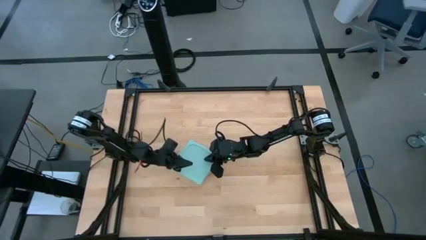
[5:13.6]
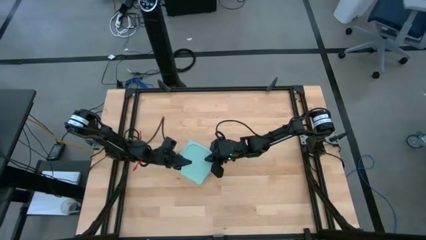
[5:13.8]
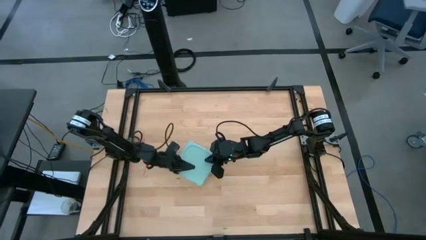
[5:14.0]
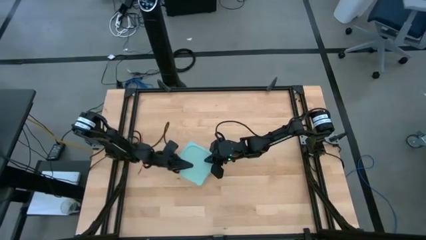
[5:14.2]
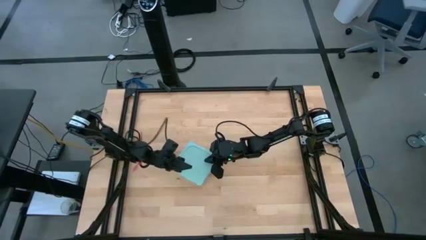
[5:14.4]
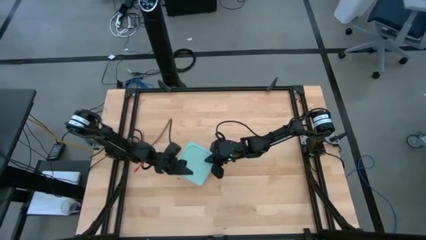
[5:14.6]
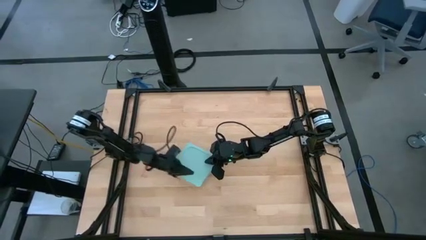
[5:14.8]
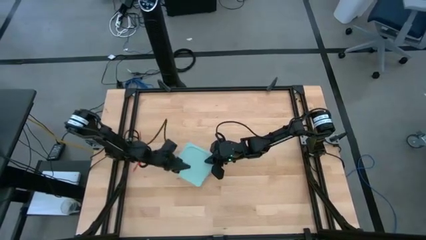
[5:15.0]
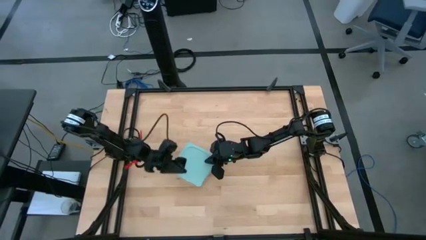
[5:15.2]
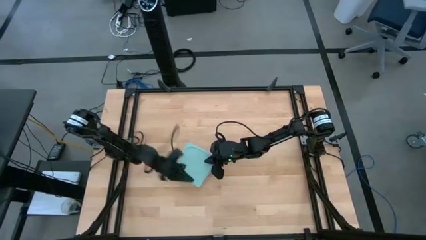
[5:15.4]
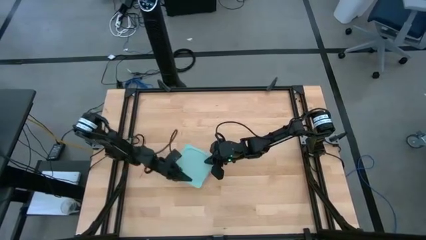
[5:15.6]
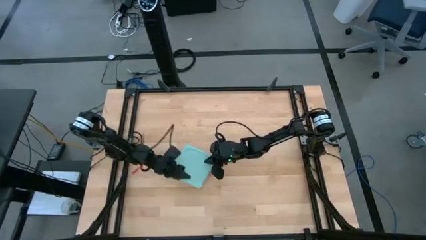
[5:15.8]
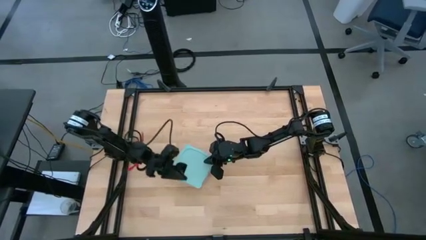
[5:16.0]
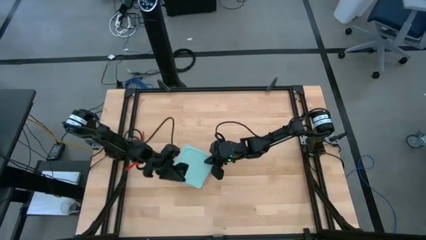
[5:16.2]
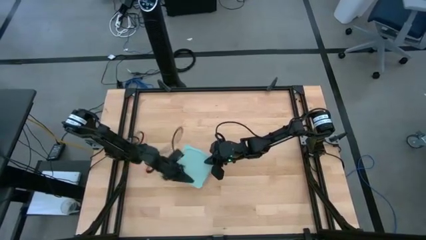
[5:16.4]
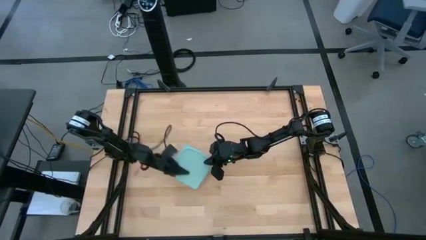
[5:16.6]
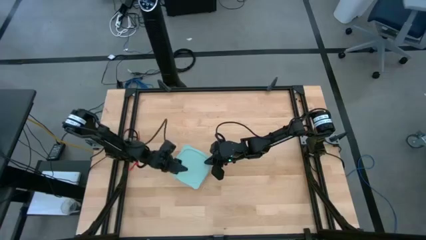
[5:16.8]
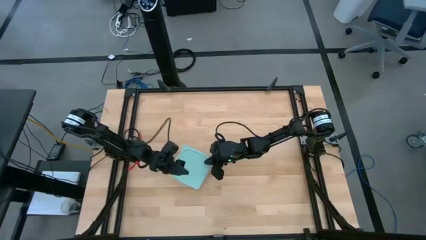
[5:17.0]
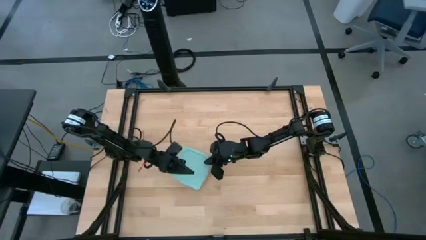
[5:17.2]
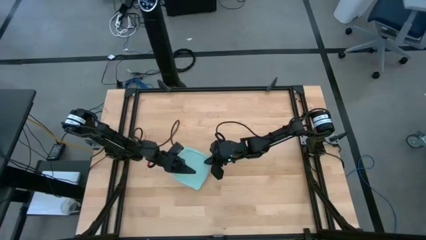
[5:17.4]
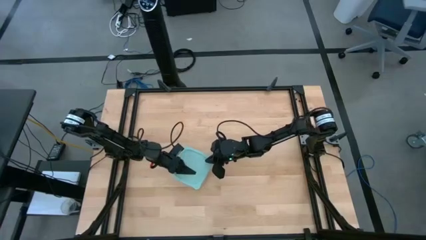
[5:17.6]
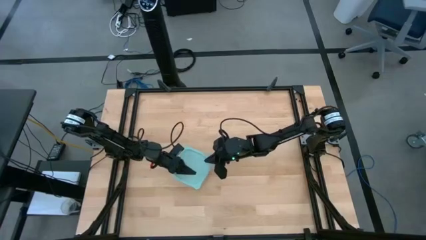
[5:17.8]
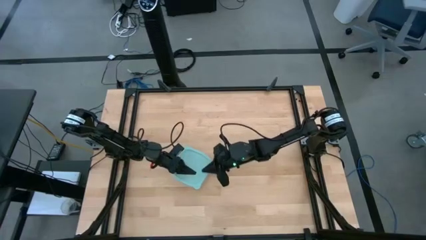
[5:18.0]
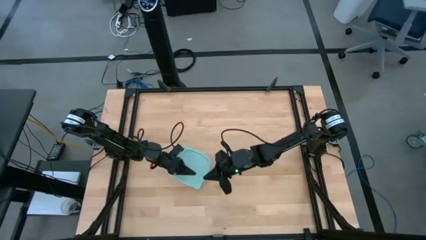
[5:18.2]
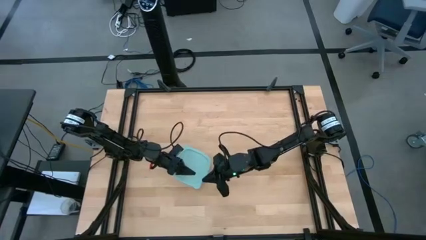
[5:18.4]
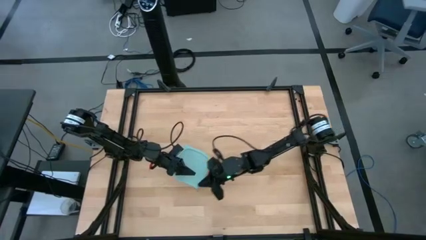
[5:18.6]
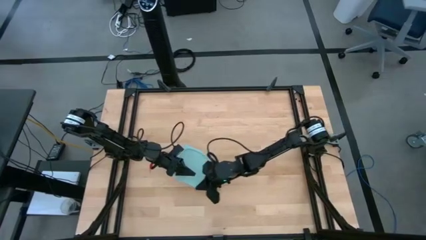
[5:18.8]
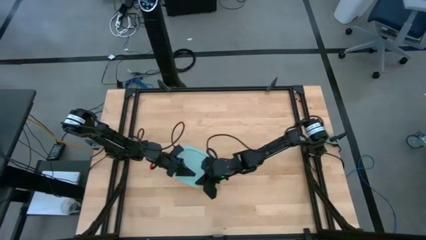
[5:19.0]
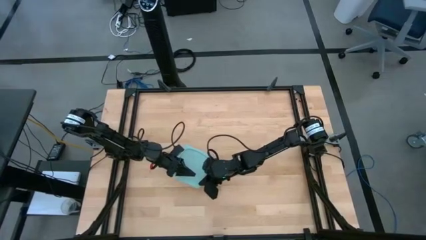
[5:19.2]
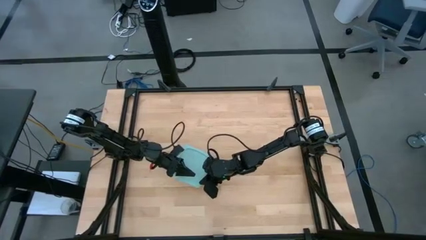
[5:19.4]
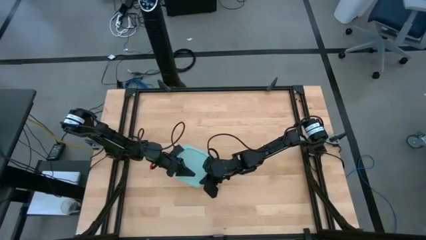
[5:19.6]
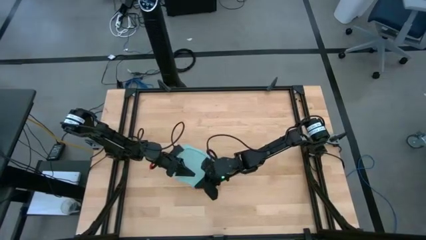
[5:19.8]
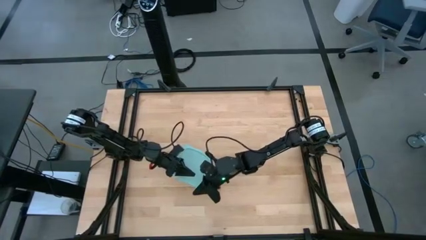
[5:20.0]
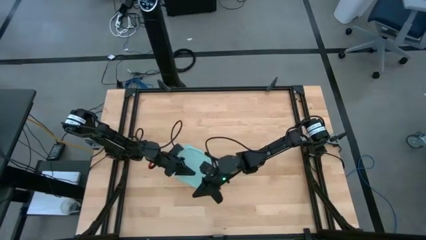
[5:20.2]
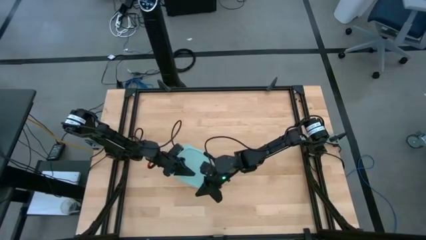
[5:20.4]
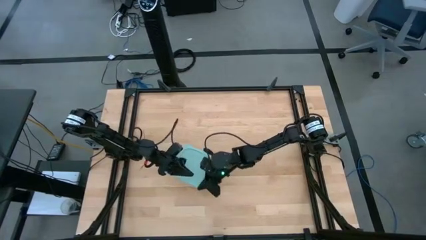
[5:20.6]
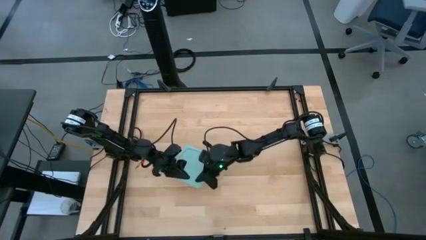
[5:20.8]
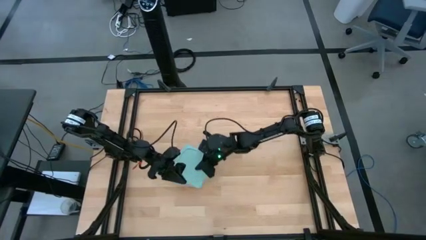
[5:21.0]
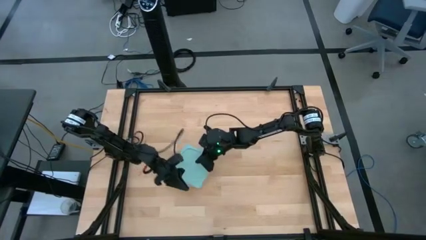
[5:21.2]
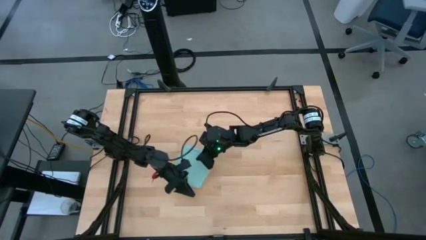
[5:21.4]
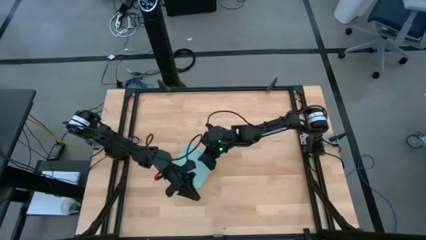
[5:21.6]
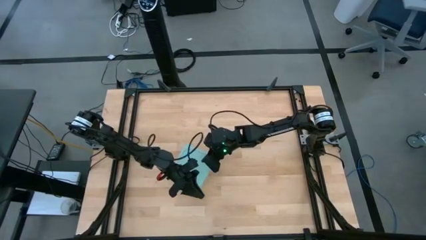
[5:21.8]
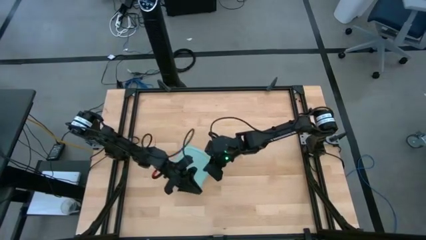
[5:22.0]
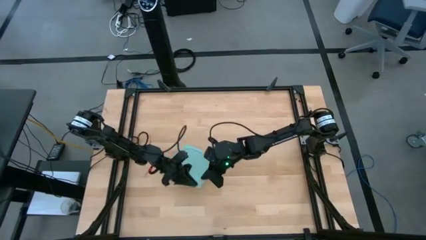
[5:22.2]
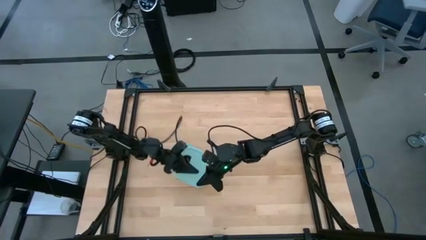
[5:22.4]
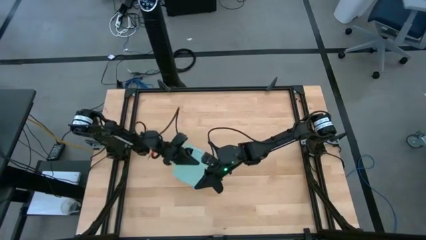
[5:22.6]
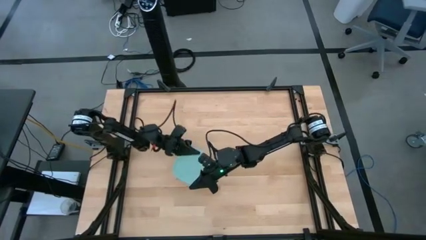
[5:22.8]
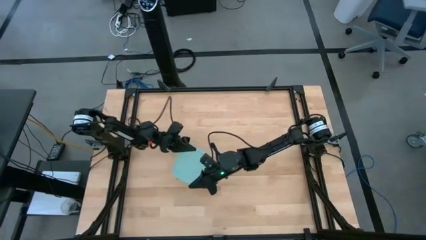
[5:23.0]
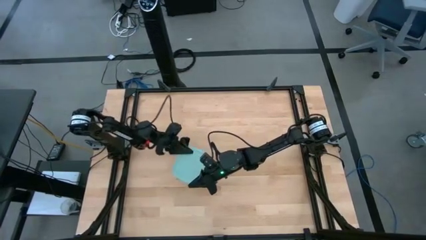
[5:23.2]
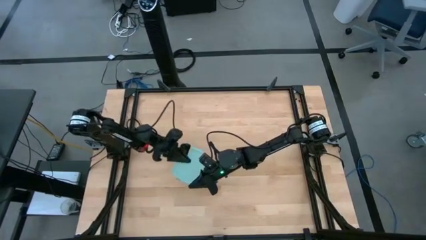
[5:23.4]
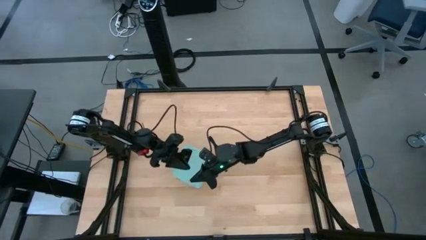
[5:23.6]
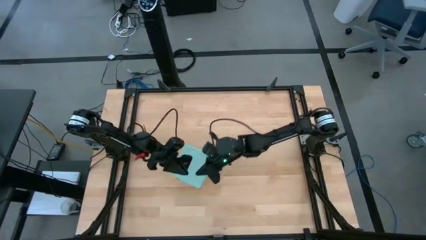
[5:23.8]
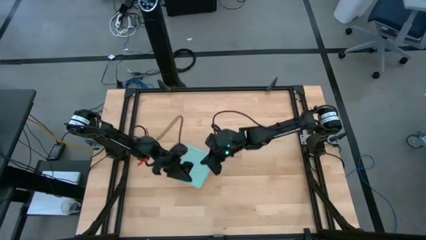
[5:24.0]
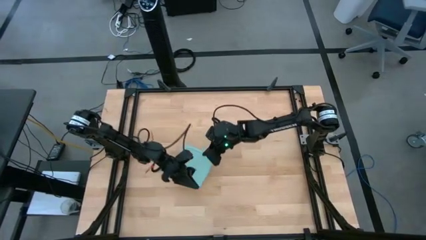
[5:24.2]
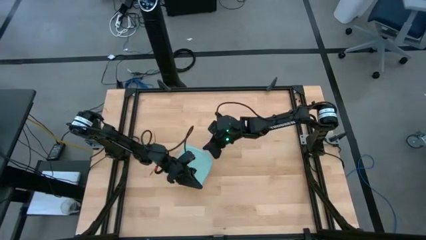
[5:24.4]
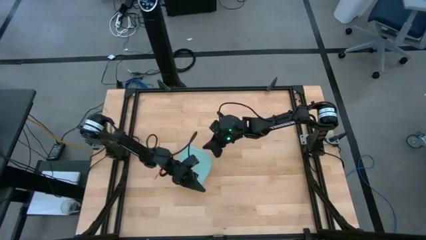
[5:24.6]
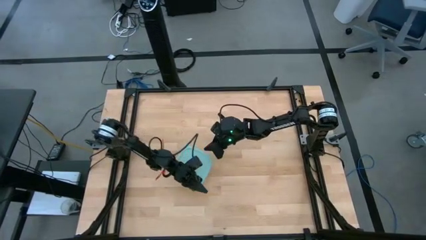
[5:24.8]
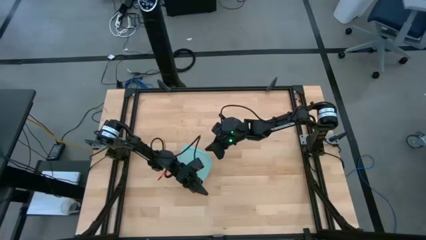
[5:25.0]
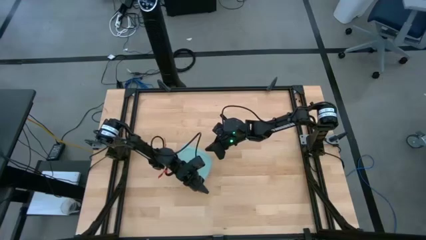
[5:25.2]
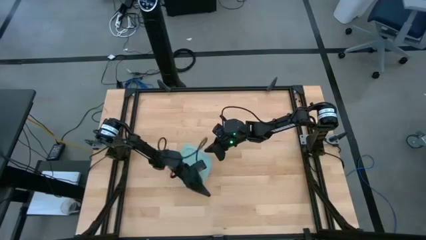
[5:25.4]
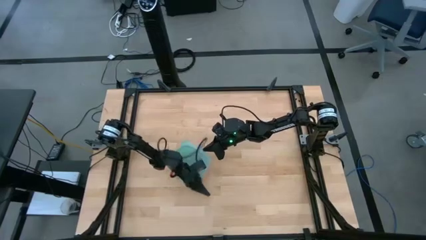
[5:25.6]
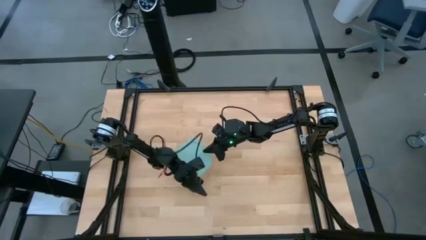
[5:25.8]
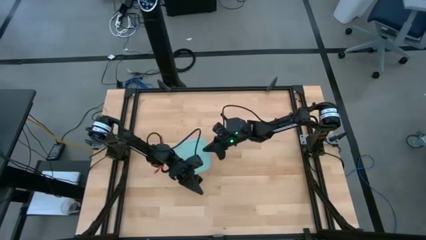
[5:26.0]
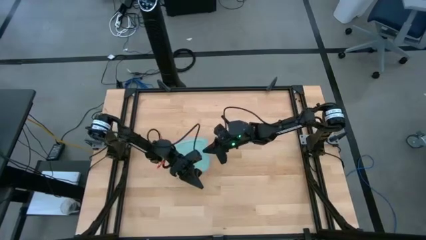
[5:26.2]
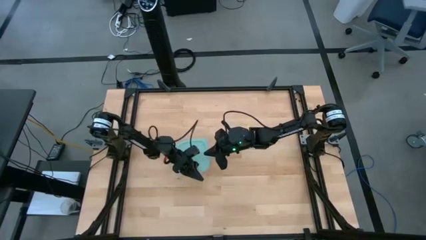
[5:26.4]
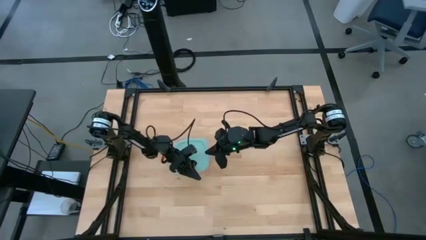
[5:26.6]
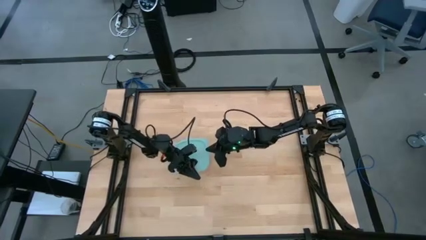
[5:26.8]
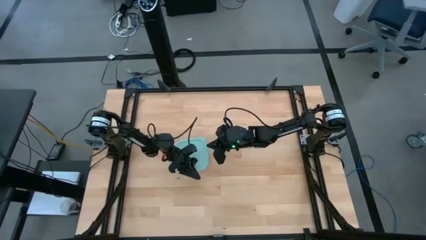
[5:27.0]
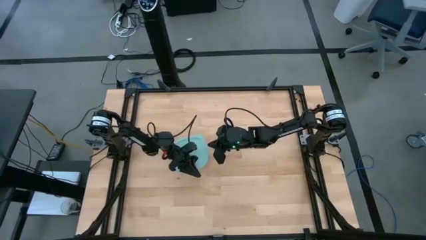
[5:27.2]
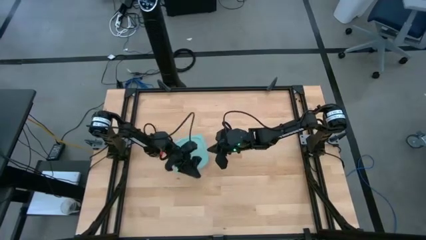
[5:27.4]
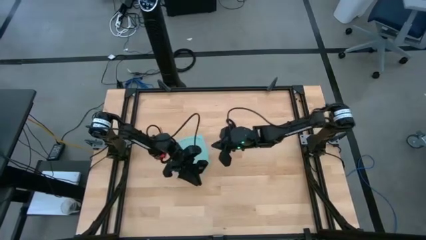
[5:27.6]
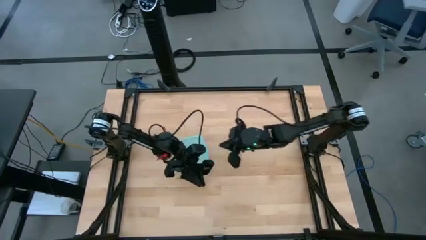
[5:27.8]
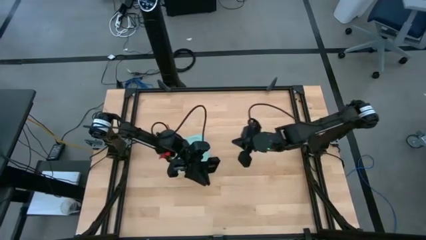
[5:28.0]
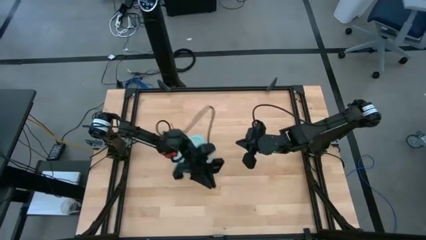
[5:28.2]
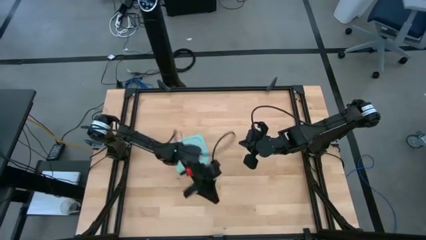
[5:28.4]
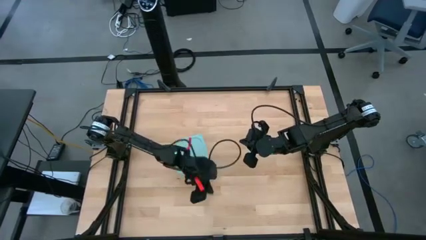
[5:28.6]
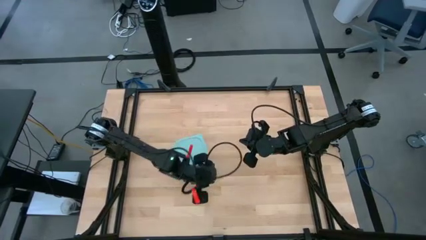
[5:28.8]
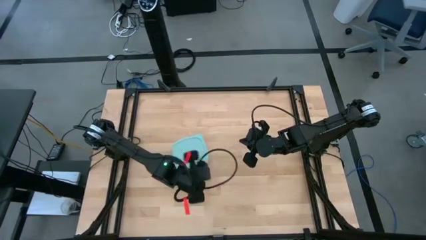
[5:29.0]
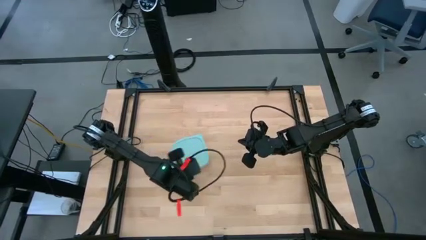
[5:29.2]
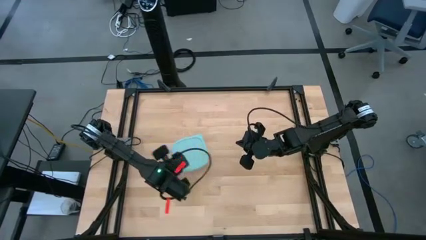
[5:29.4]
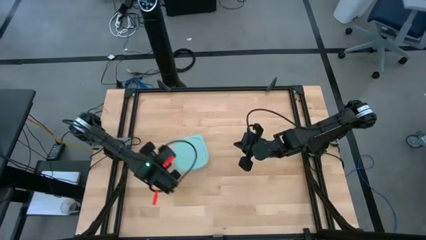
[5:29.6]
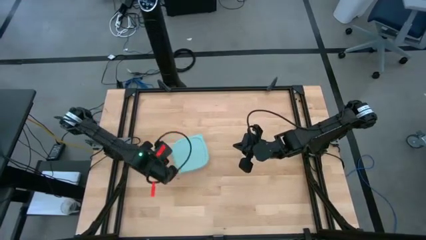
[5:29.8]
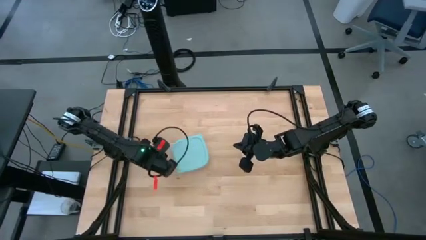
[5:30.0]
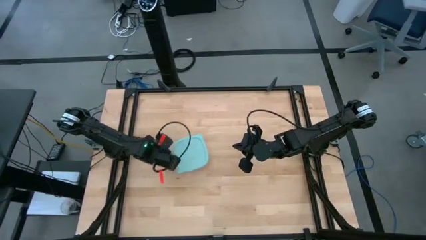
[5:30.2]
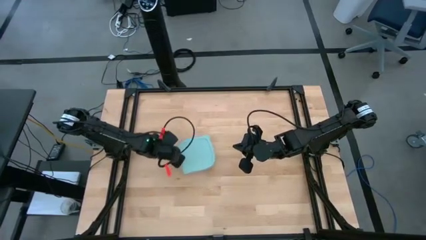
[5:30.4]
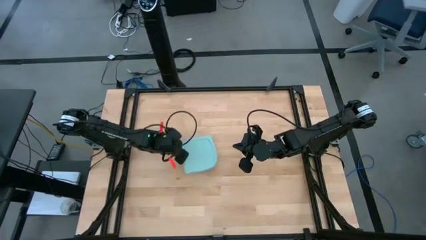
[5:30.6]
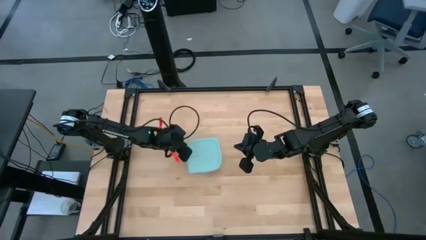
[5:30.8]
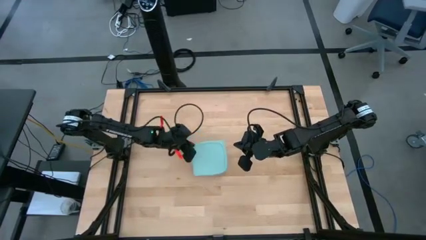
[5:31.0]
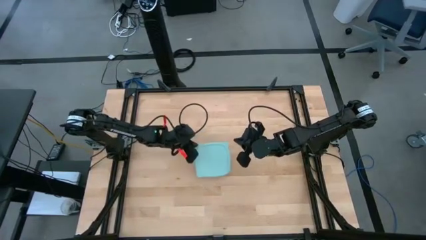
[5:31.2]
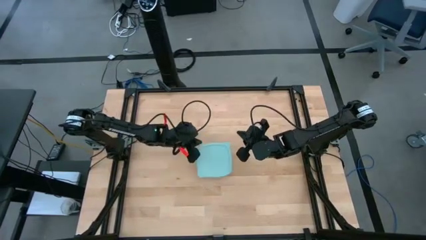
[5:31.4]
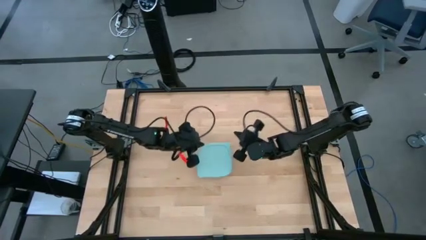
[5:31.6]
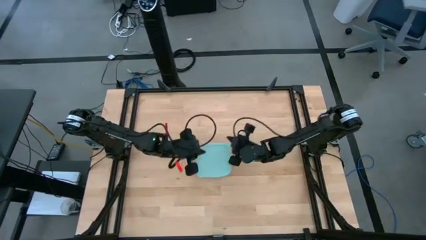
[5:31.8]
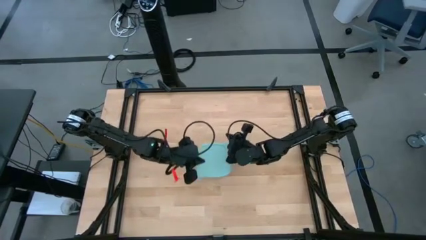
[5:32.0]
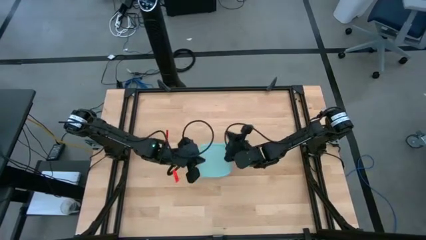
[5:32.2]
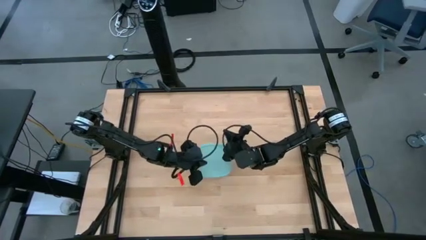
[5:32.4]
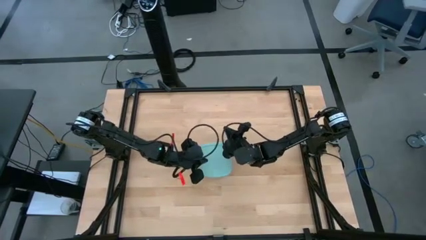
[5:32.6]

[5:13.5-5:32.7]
Task: Roll bandage
Close the transparent tupperware
